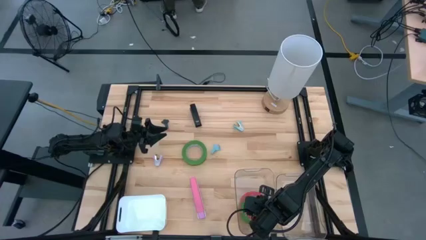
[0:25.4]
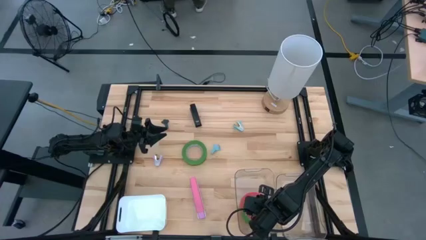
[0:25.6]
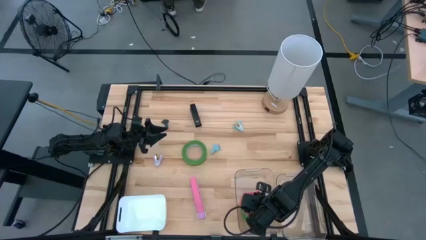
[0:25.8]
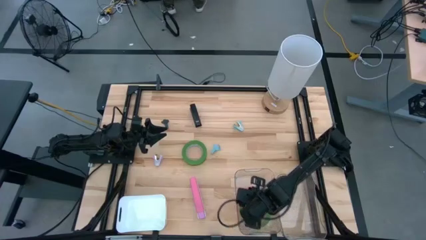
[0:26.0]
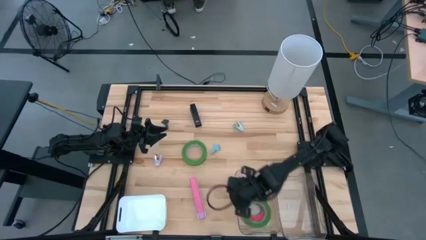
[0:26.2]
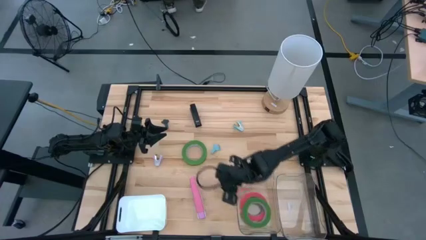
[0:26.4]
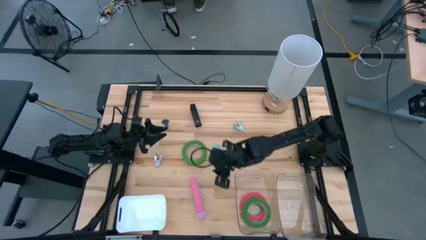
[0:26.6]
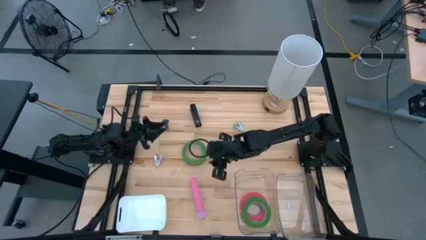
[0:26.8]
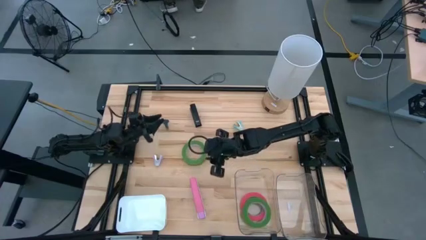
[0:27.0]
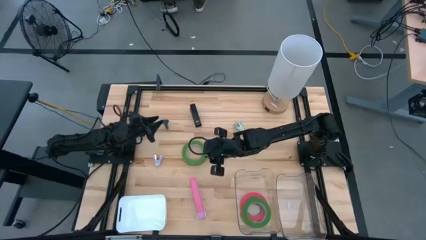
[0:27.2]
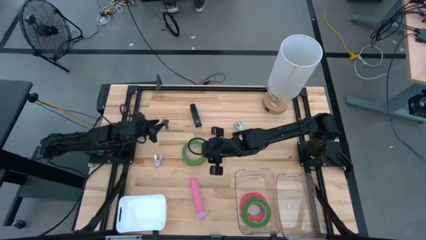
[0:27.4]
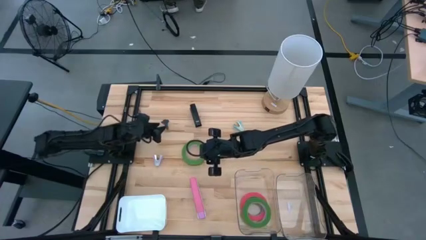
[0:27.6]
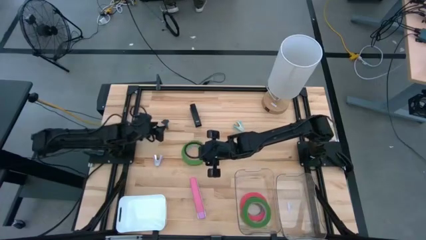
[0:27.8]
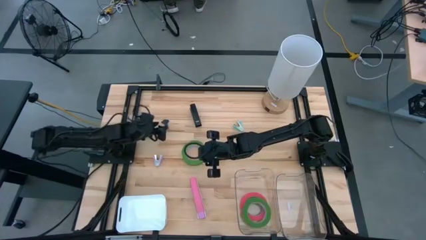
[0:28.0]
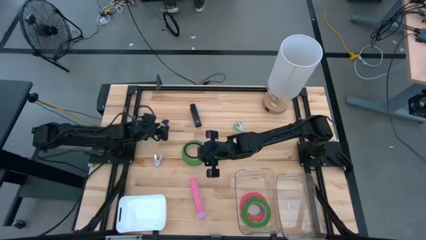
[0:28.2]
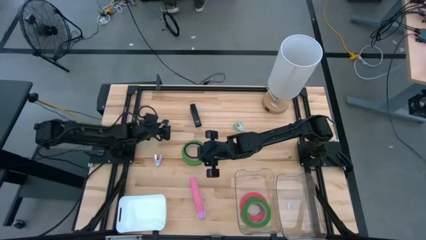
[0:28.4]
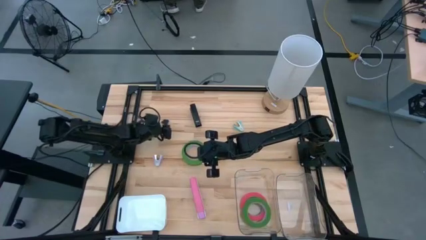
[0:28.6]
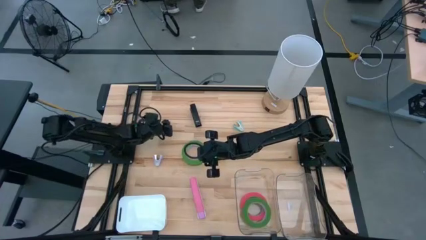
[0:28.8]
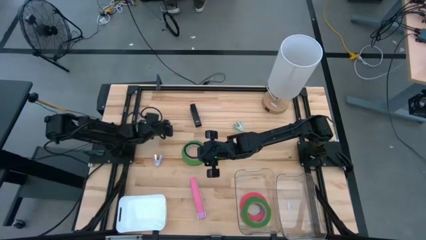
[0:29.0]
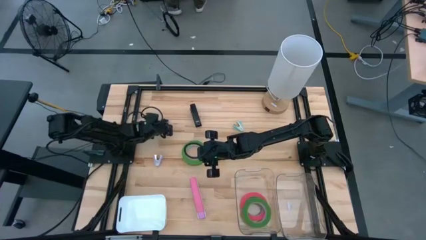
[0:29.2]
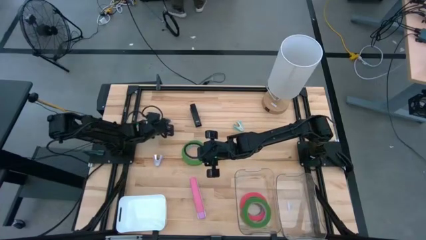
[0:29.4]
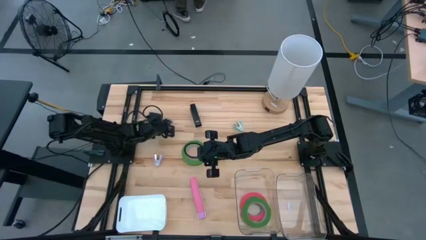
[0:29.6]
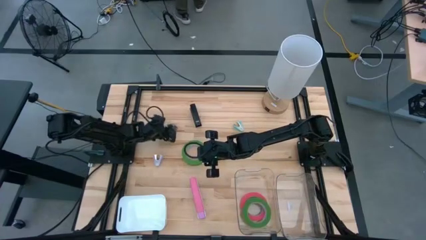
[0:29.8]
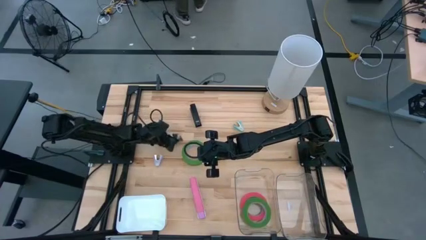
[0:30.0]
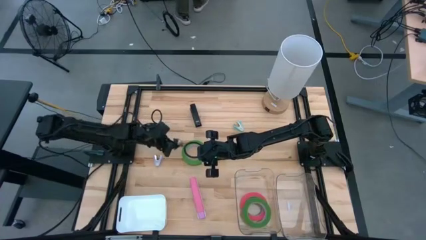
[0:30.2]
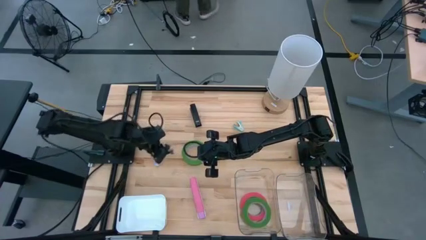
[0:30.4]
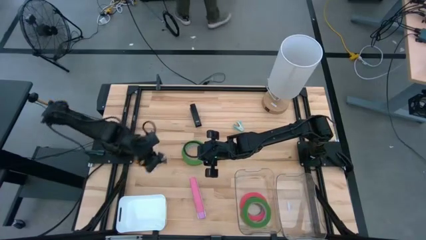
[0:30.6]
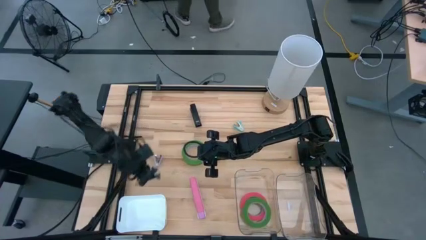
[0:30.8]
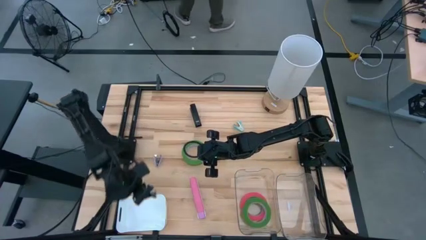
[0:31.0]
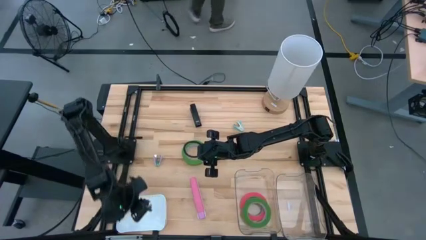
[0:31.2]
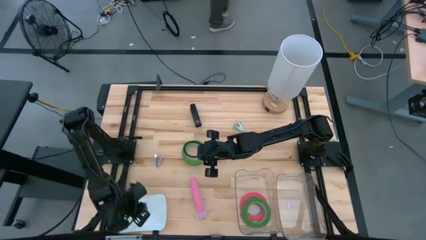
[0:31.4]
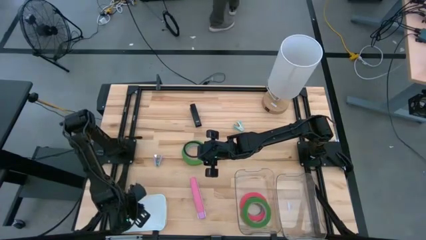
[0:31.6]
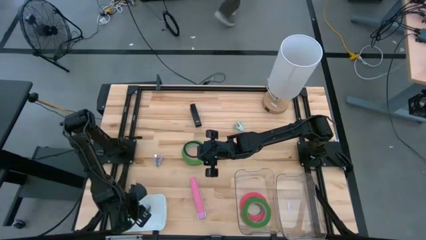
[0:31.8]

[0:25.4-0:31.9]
Task: Pick and place Stapler, Stapler remover, tape
Put the black staple remover into the white bin

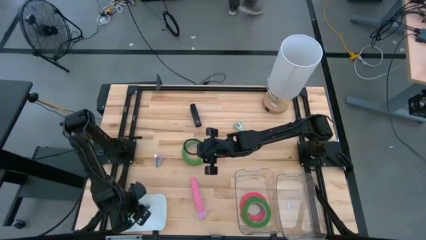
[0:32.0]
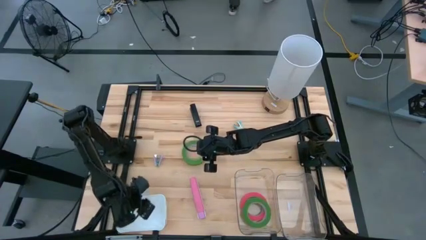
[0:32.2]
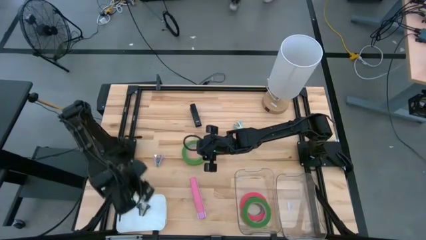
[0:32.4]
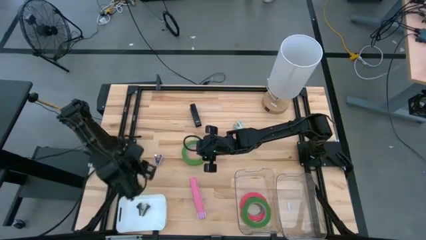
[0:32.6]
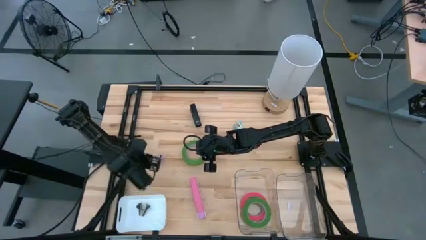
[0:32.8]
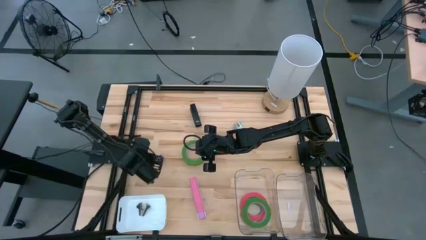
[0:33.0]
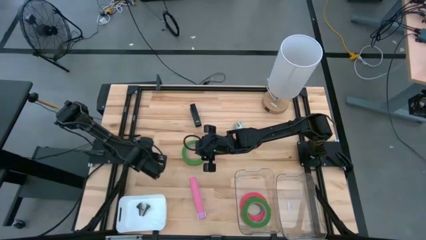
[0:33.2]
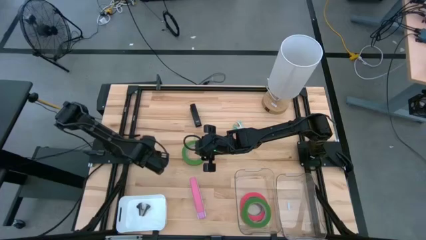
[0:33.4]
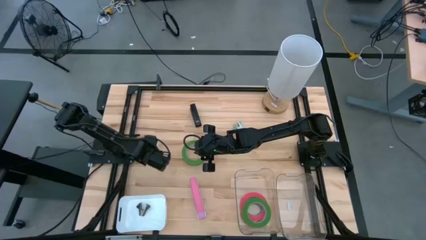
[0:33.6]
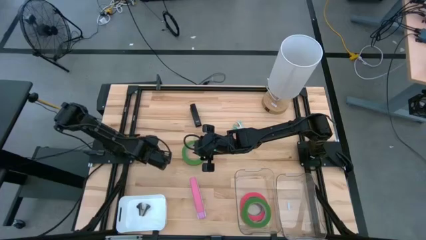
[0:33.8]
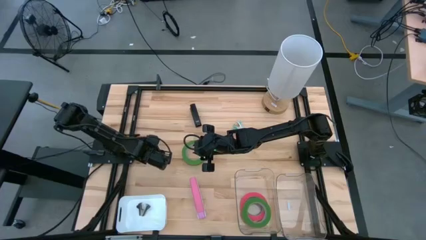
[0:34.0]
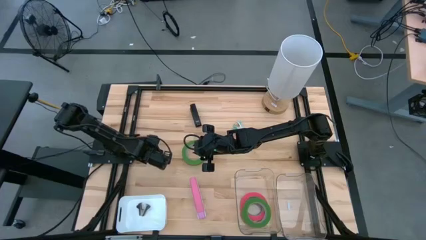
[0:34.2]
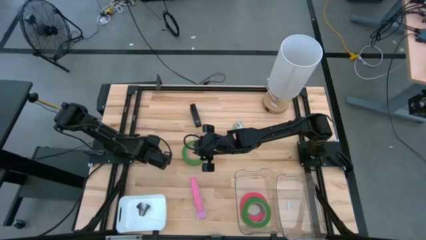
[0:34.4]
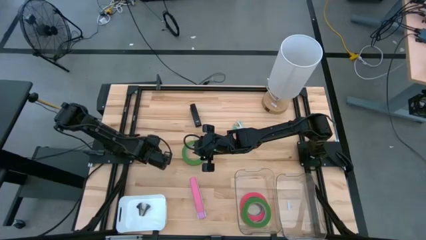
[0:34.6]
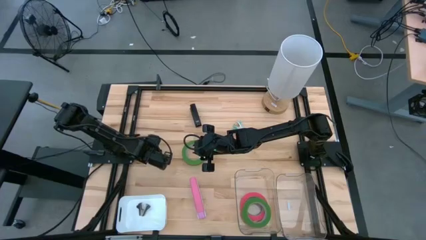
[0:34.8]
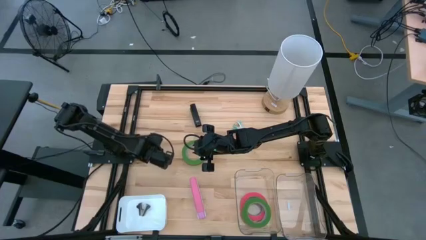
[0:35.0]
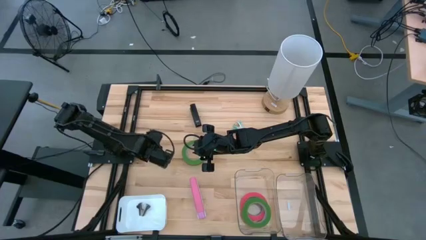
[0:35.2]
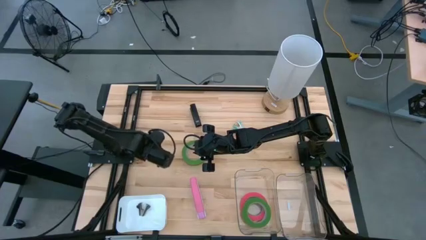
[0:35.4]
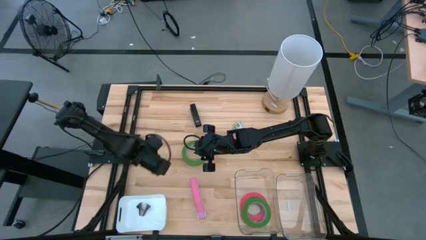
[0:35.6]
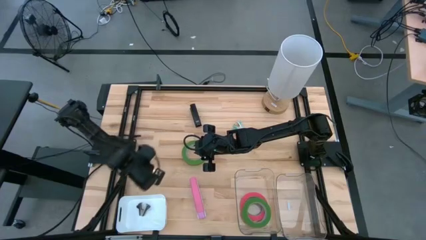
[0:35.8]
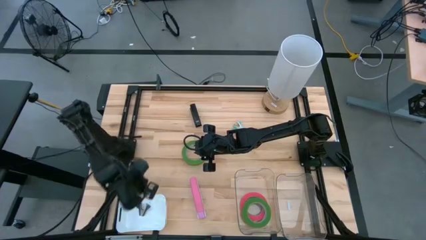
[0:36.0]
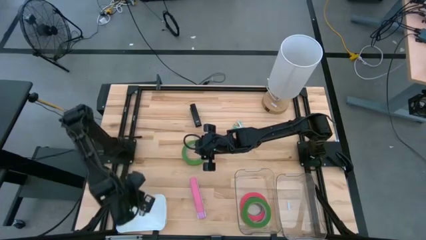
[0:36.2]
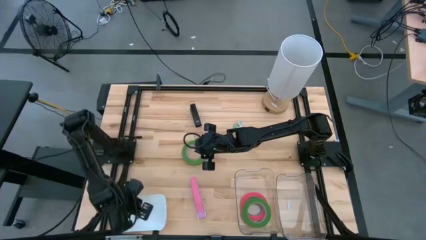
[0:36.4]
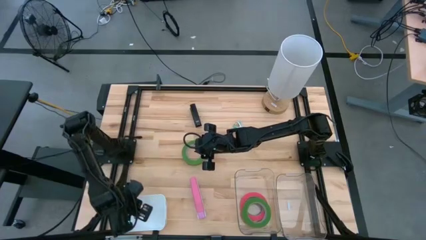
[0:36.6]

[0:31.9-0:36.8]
Put the purple staple remover into the white bin
